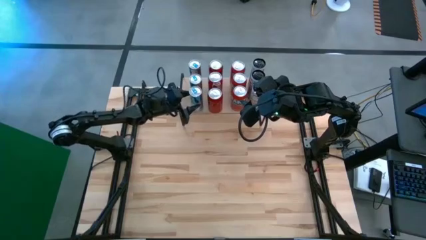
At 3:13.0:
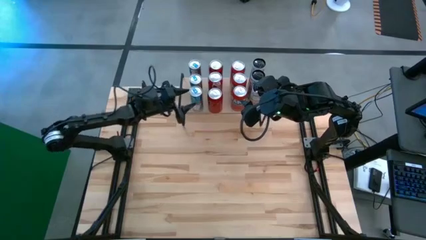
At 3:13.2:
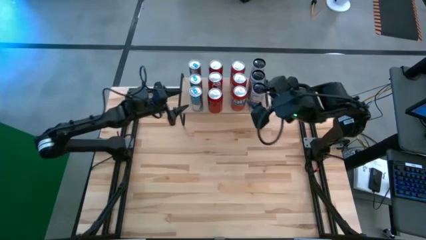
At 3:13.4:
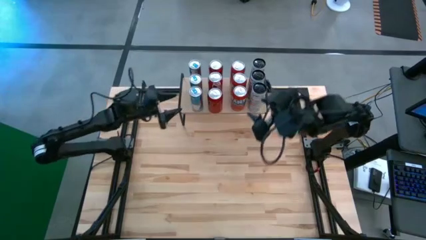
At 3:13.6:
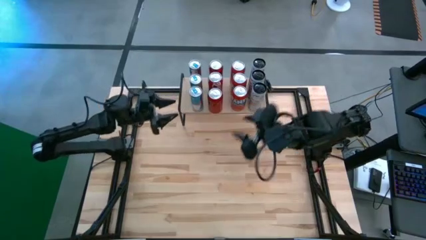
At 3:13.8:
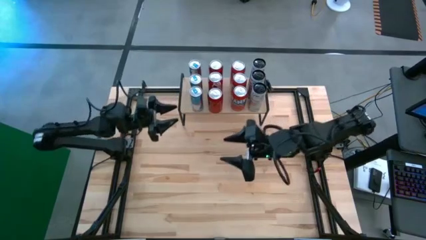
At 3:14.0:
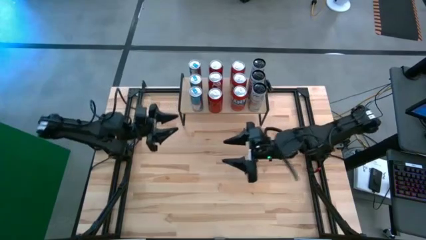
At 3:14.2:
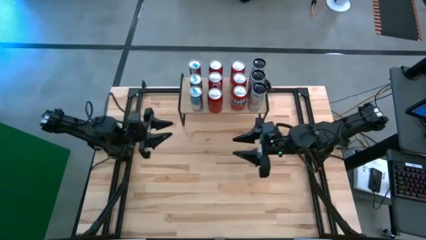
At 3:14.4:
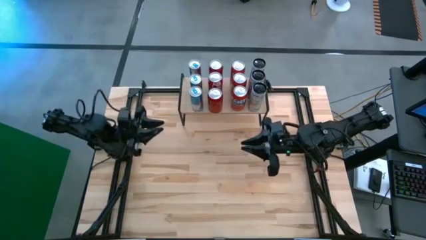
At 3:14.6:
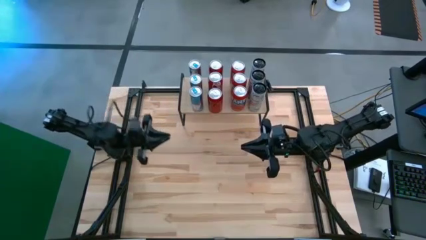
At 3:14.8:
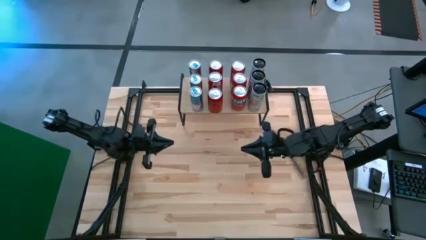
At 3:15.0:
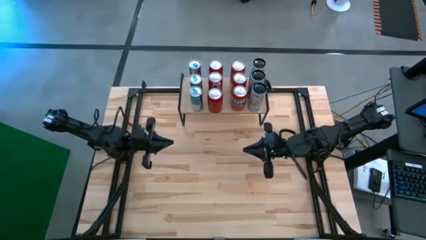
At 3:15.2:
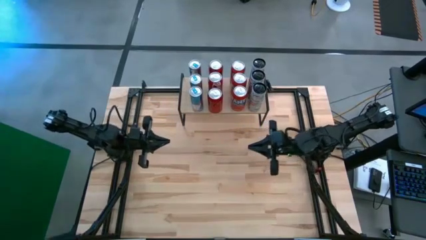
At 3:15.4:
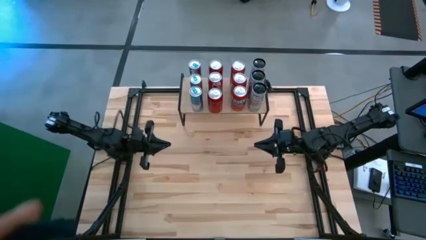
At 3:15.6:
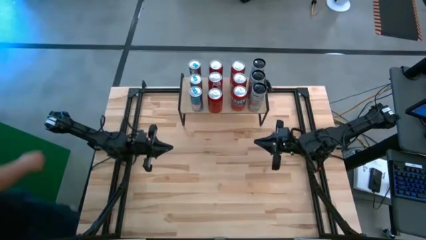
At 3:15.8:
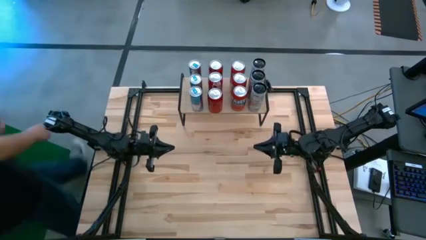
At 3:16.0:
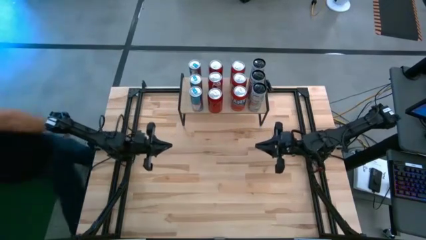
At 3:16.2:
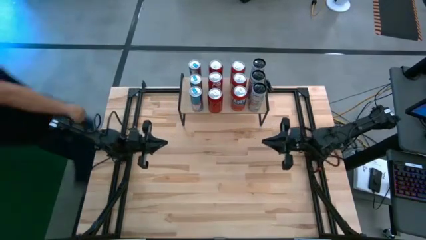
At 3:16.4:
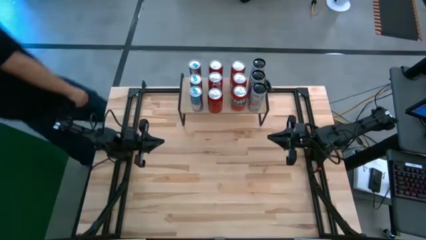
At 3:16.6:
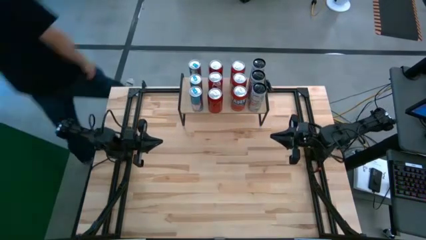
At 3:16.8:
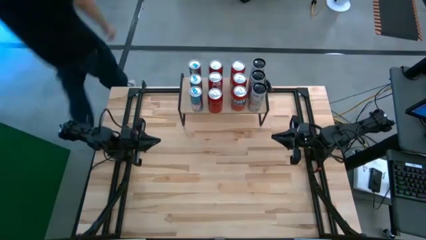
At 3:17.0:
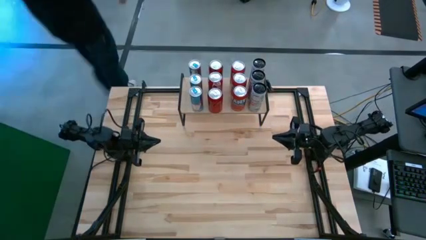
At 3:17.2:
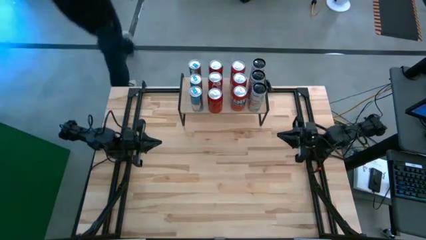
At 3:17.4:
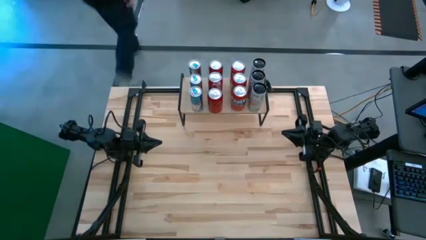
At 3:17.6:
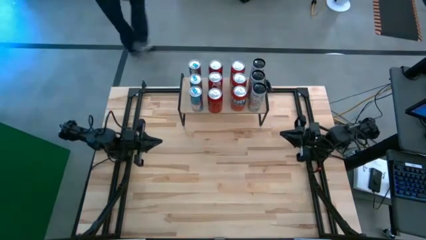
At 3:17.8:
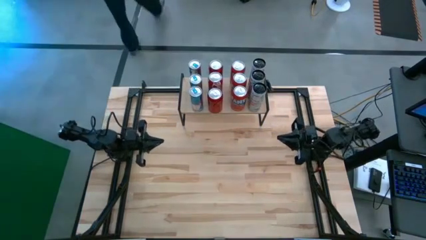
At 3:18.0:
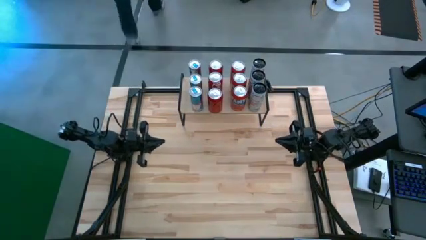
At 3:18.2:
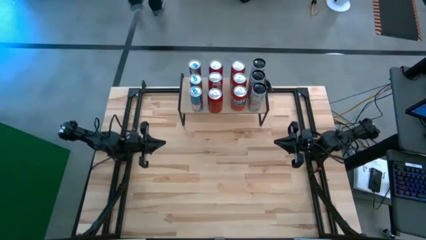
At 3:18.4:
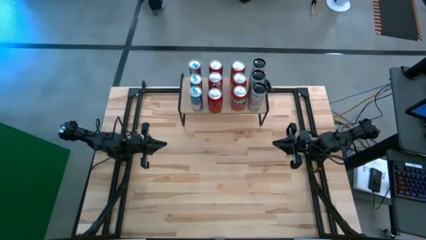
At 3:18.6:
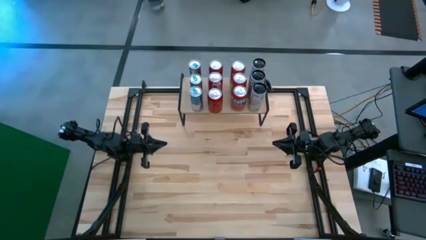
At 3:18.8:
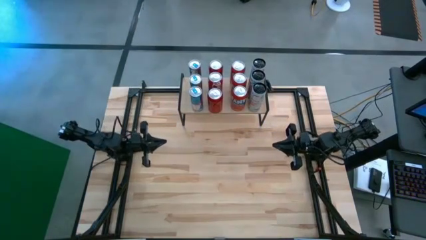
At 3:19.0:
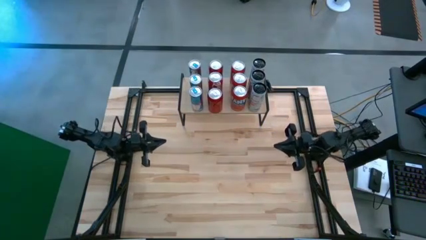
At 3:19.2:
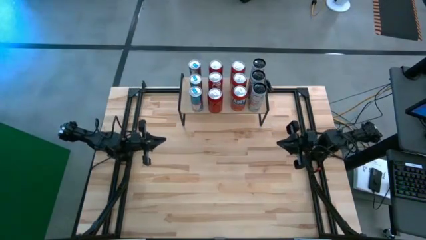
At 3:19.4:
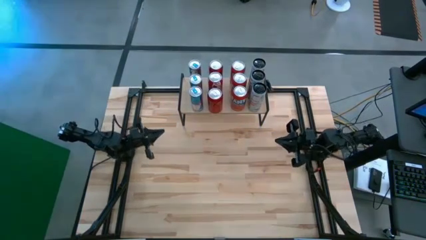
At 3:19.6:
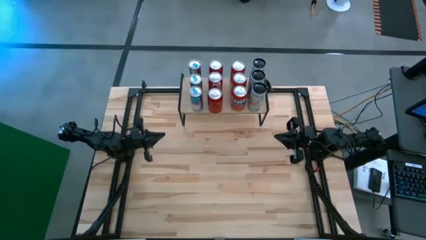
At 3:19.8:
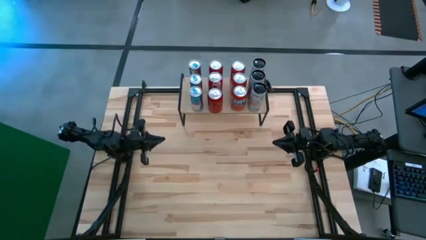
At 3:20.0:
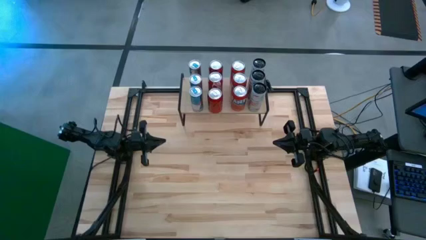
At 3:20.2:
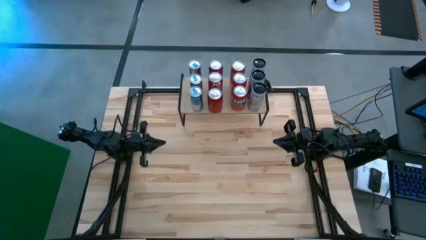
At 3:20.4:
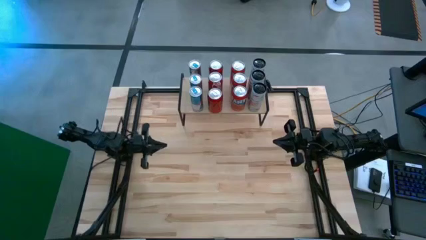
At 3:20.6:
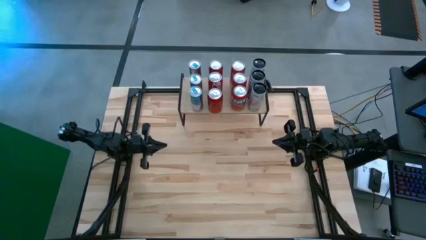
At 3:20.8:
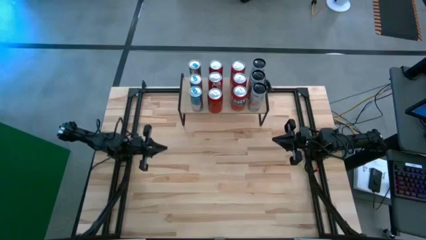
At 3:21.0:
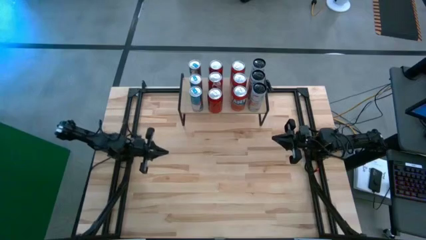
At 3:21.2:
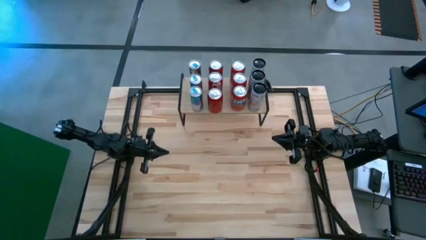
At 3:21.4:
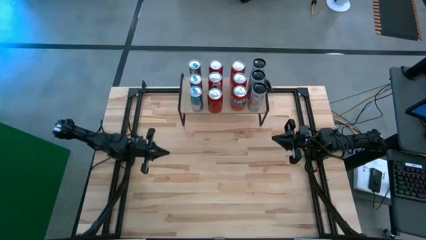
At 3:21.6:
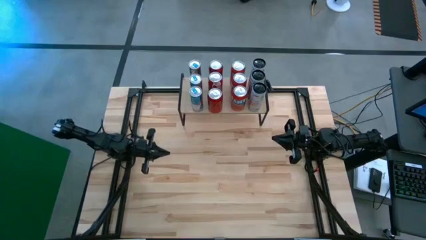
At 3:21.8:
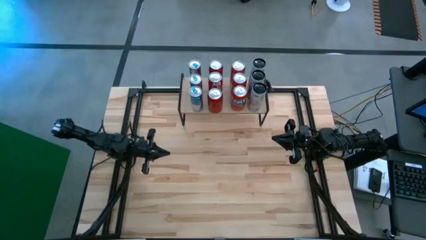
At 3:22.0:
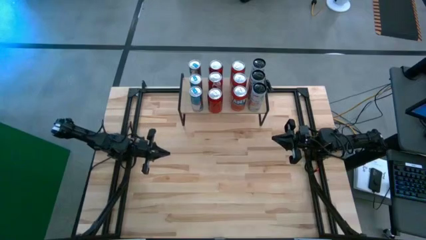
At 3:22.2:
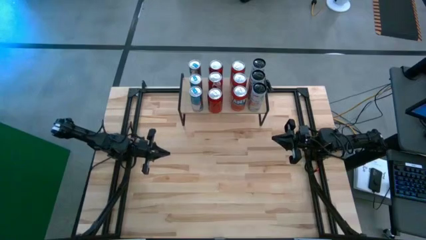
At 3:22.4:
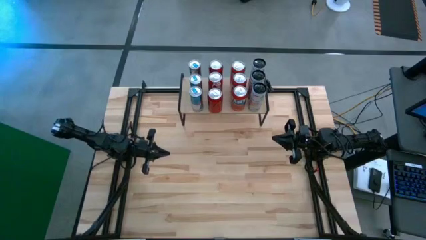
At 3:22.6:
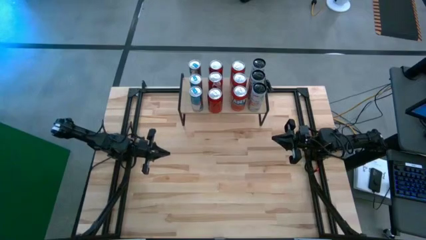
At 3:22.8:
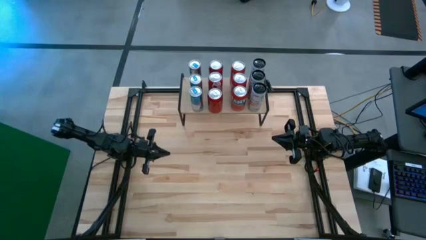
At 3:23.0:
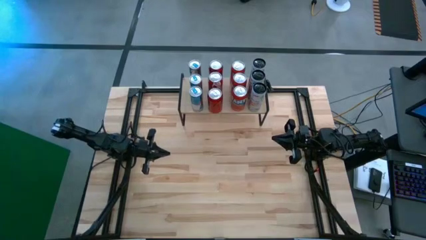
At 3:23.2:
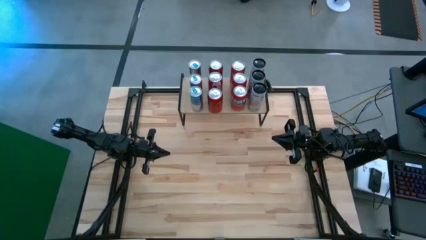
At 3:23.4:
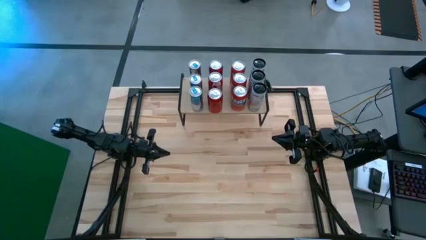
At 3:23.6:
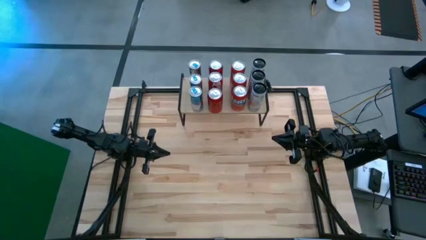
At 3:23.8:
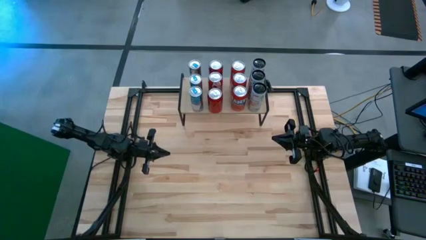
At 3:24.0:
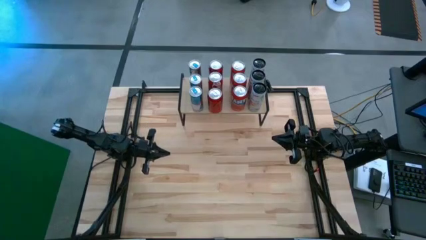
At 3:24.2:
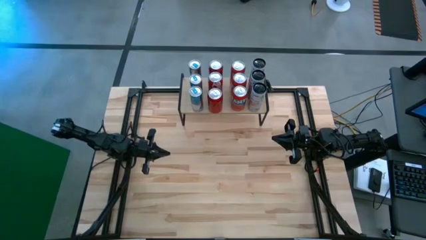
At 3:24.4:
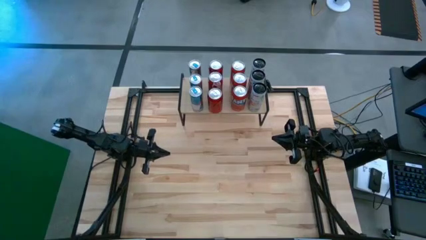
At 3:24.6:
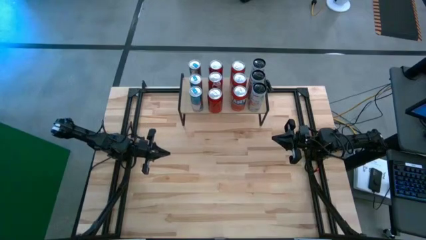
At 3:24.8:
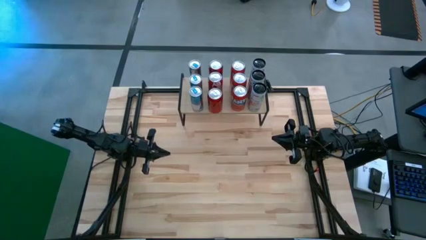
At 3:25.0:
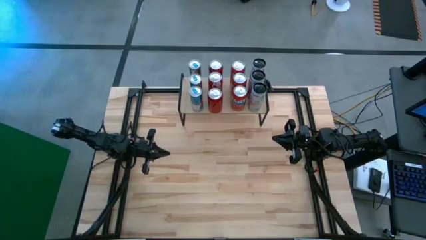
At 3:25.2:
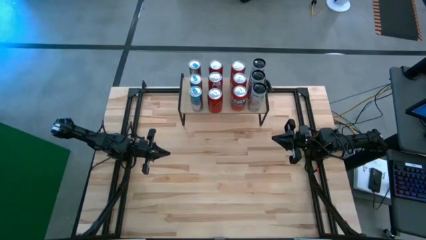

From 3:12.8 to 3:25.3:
Task: Place canned beverage on shelf
Return to Home Position

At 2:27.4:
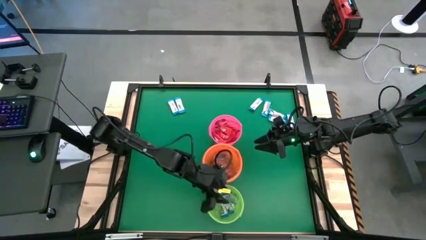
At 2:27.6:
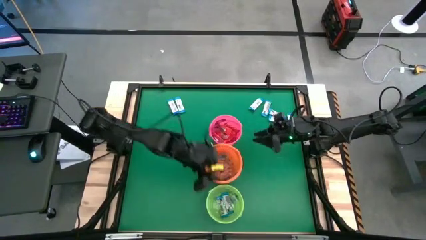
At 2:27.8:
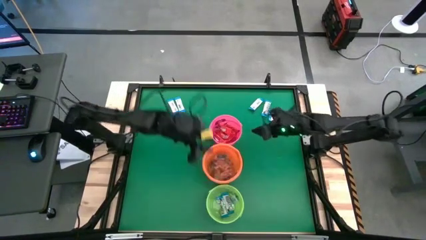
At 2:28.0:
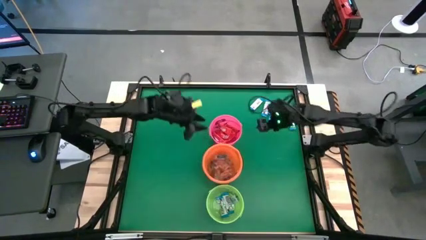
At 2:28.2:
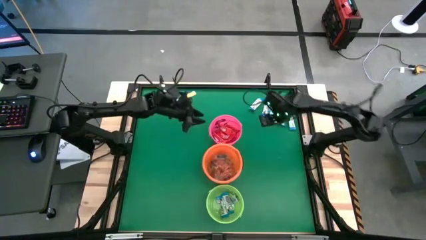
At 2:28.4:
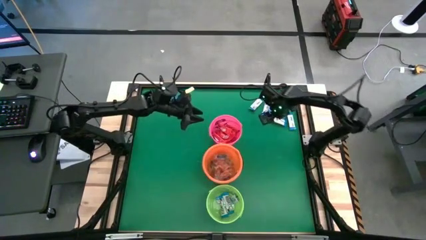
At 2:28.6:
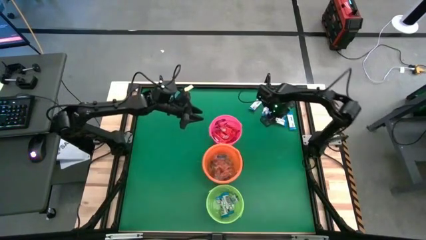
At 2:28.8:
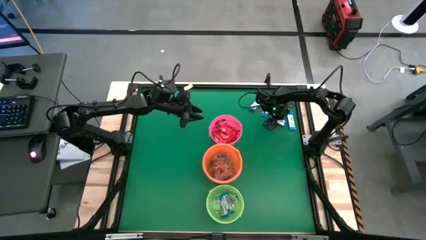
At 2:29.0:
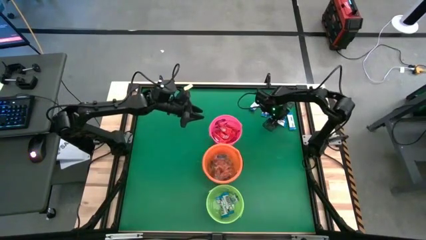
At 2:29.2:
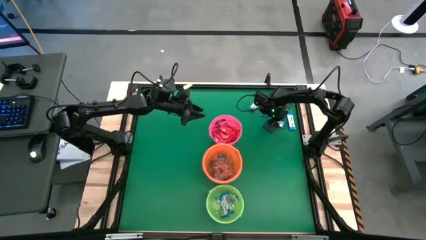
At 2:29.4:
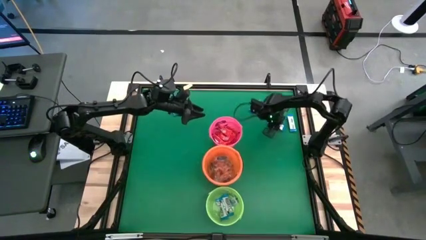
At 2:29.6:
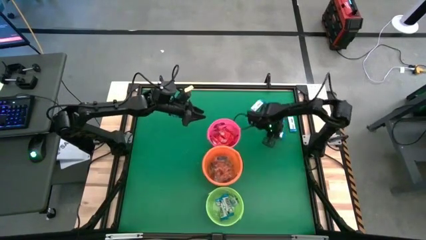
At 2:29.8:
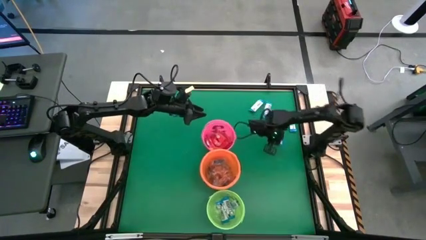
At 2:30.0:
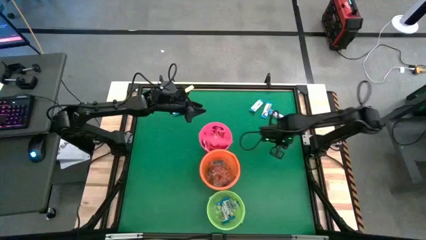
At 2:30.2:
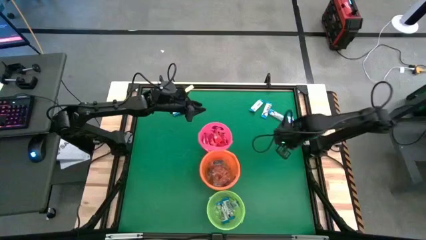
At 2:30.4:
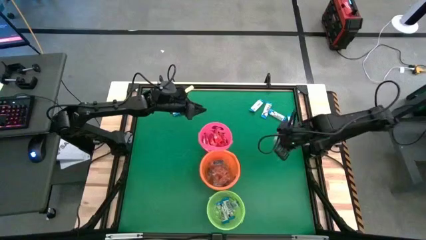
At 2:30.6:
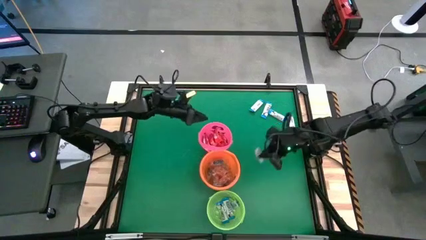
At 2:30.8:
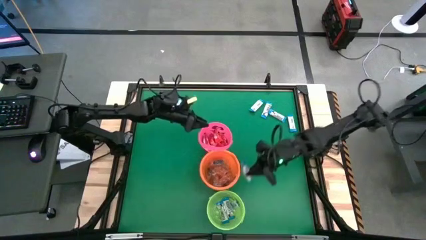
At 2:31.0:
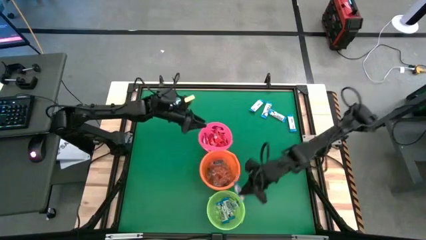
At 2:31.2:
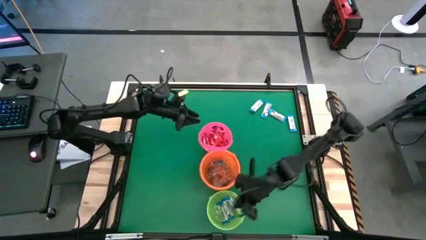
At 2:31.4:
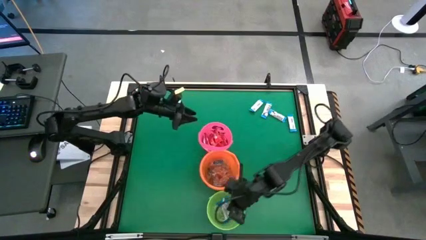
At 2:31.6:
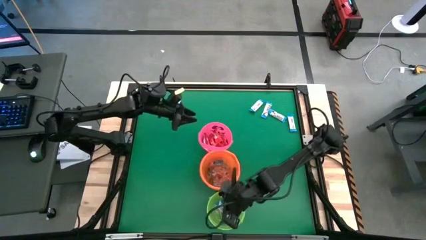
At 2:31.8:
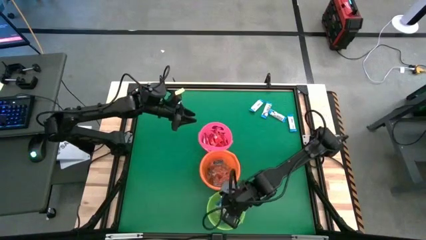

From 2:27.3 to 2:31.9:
Task: Sort candy by brand, put in halloween buckets
Put the white chocolate into the green bucket
